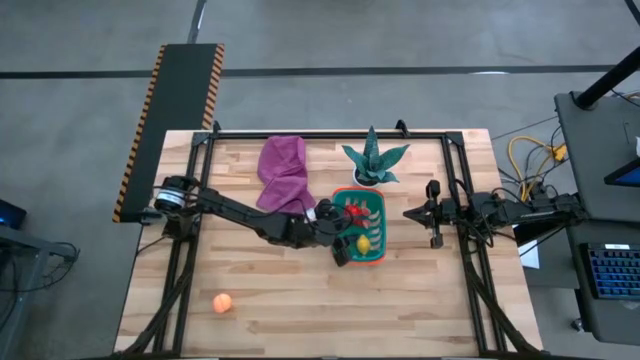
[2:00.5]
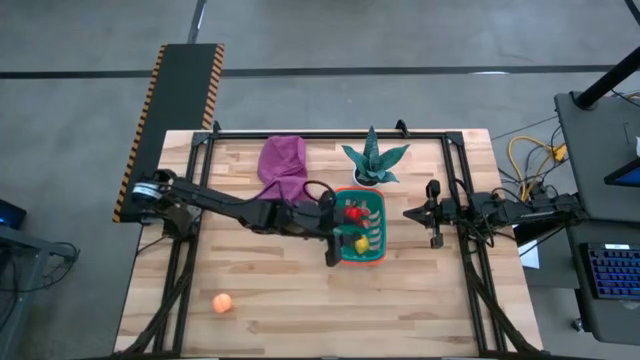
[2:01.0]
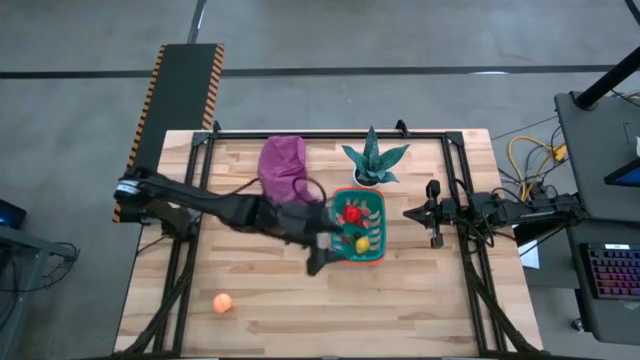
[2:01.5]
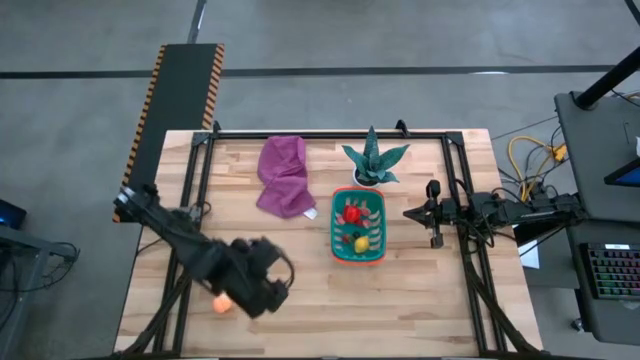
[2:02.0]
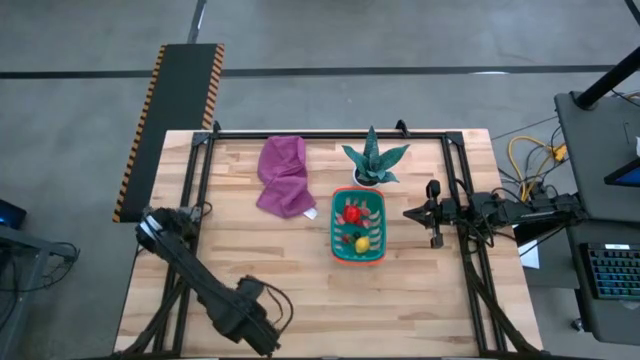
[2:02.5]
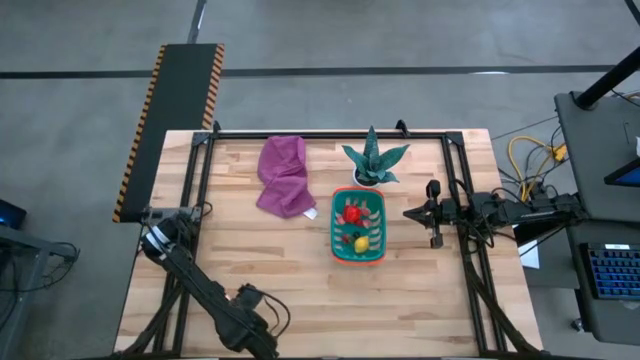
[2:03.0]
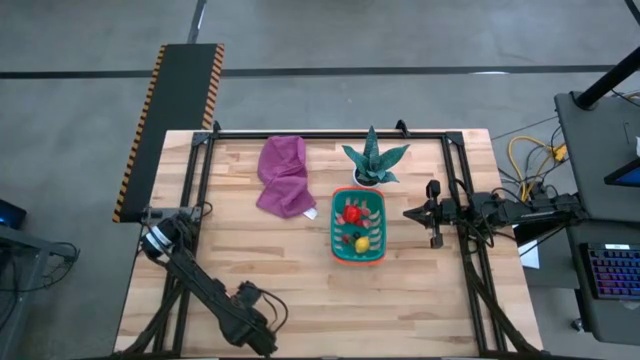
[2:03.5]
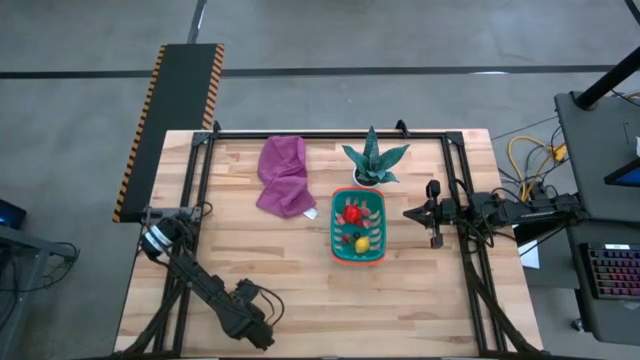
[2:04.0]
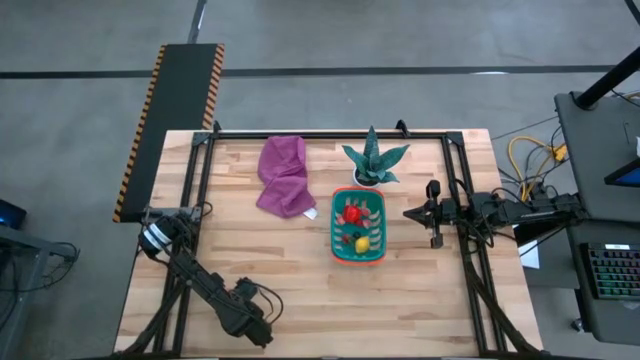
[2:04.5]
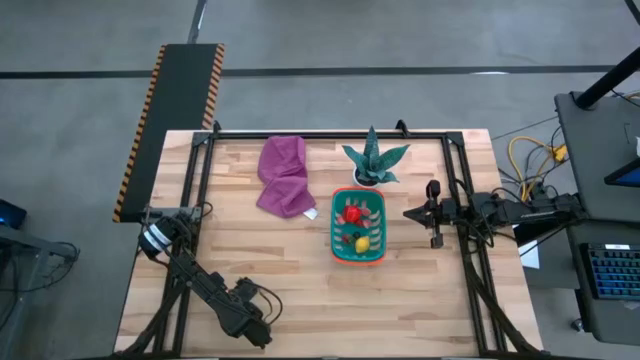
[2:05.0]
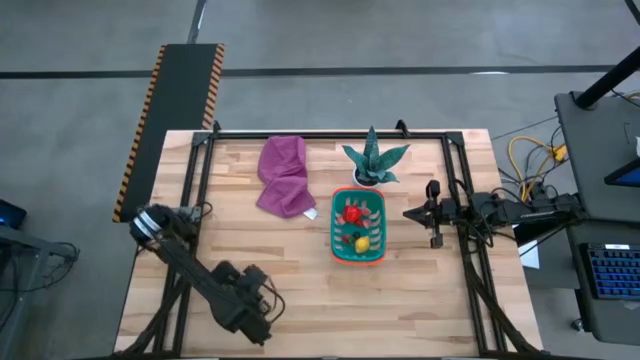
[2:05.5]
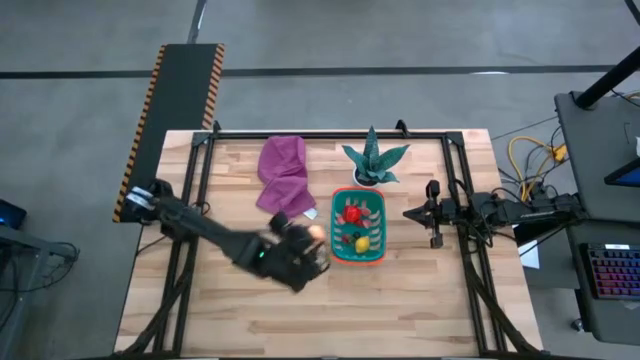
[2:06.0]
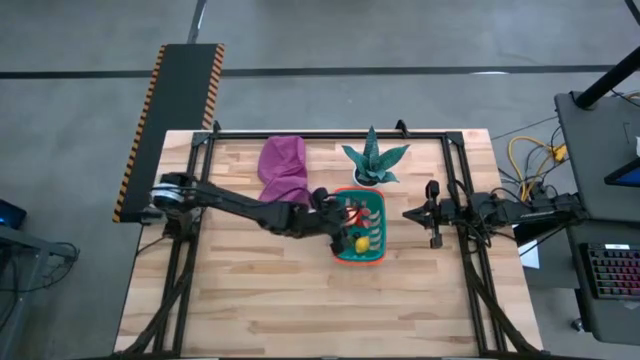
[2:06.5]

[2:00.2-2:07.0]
Task: Pick and placing Produce into tupperware
Put the pink peach into the blue basket

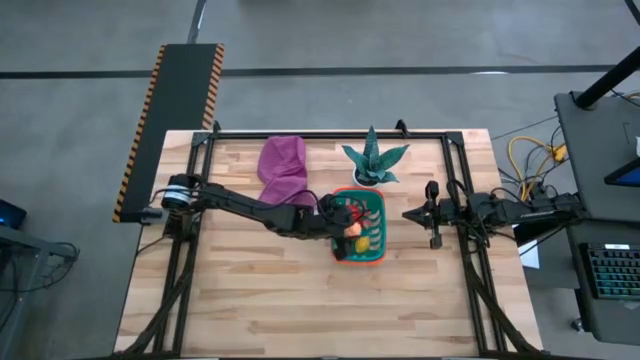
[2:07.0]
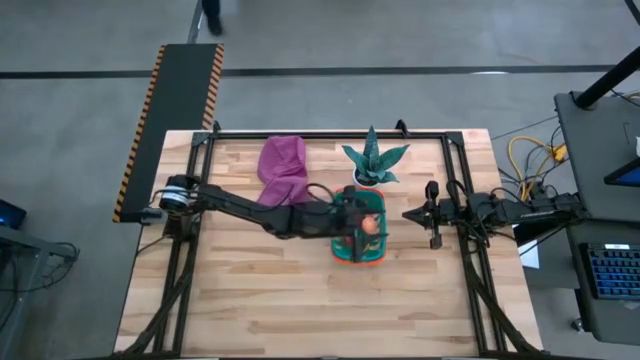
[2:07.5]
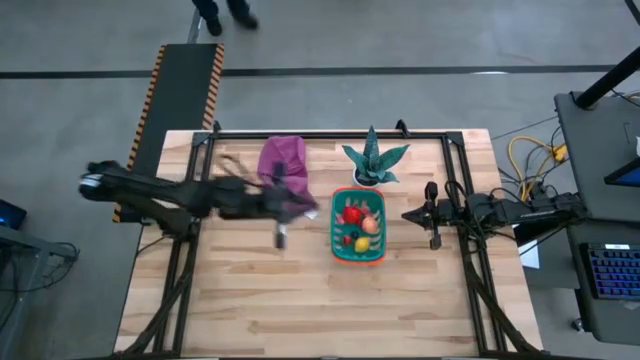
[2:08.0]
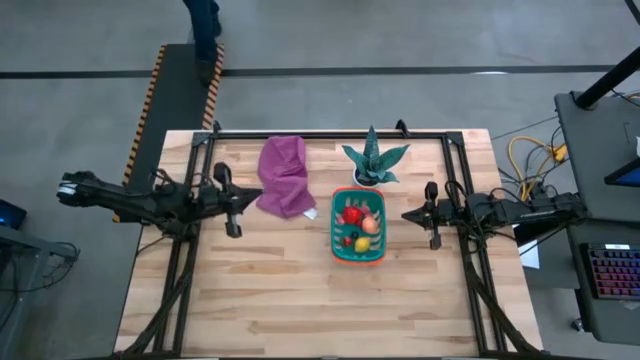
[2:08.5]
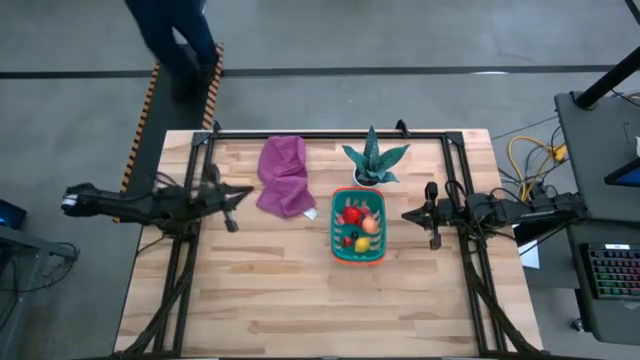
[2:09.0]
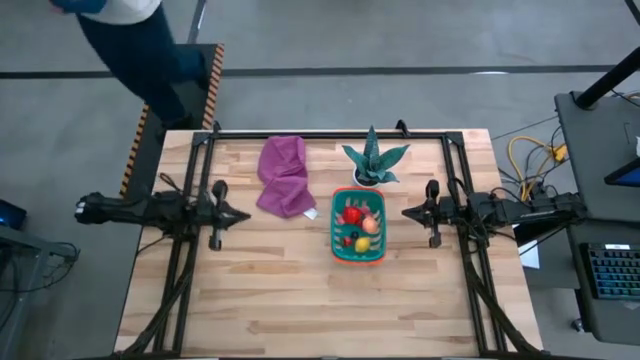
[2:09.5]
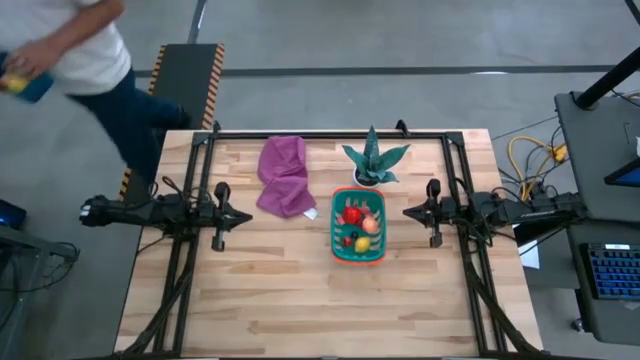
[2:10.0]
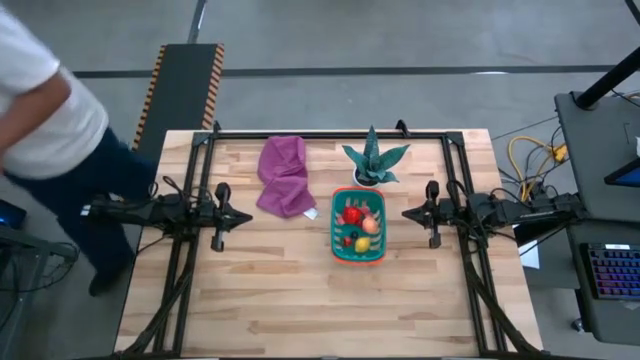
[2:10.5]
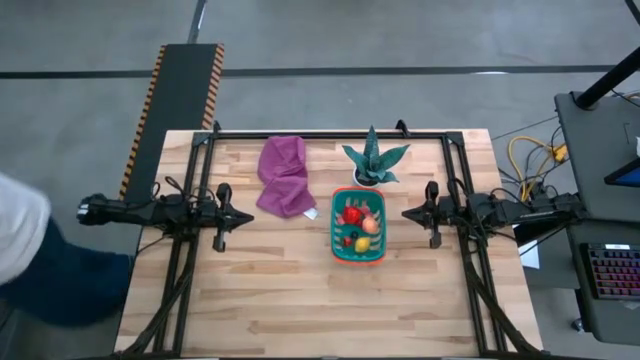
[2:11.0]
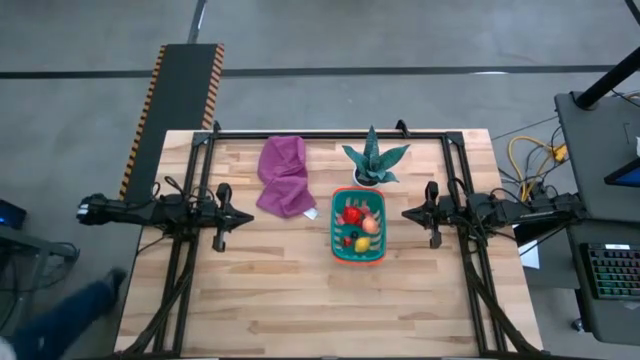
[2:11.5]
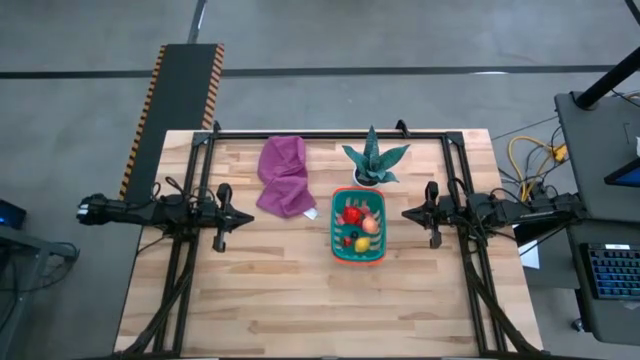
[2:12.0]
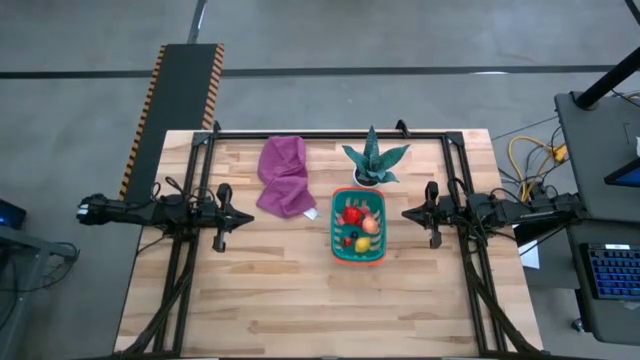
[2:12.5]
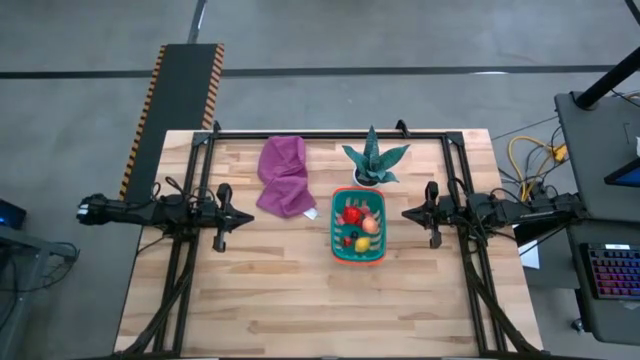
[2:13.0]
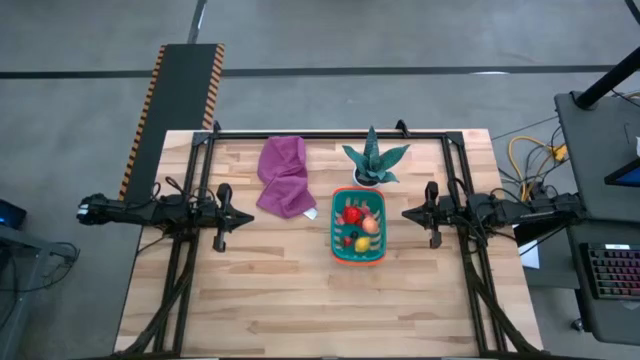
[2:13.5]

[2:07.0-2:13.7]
Return to Home Position
